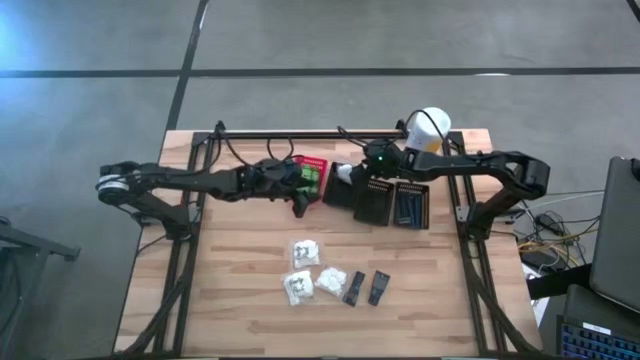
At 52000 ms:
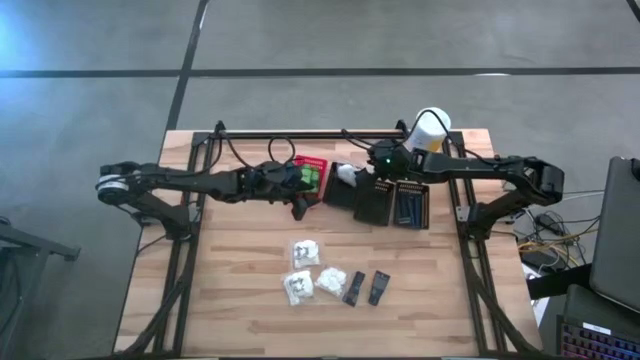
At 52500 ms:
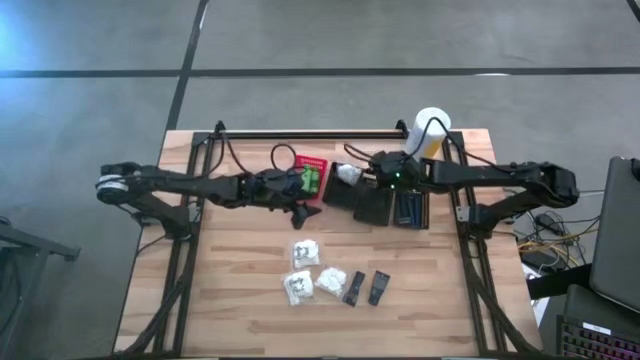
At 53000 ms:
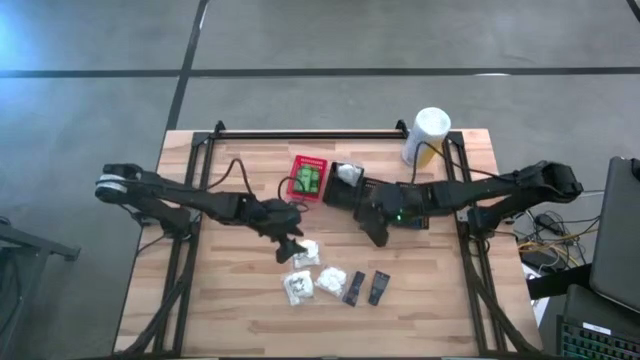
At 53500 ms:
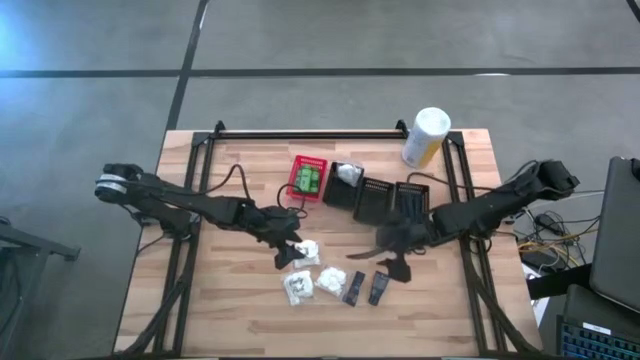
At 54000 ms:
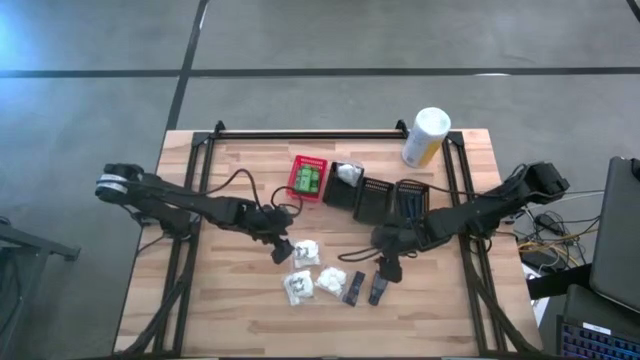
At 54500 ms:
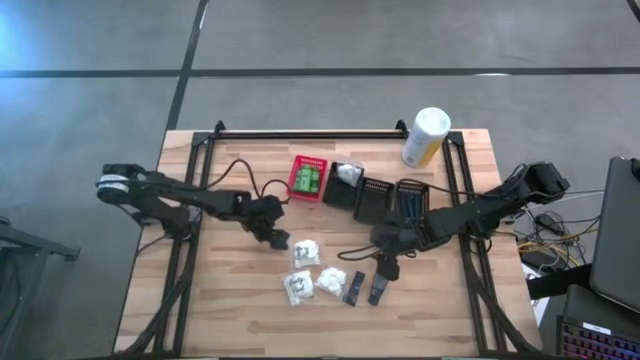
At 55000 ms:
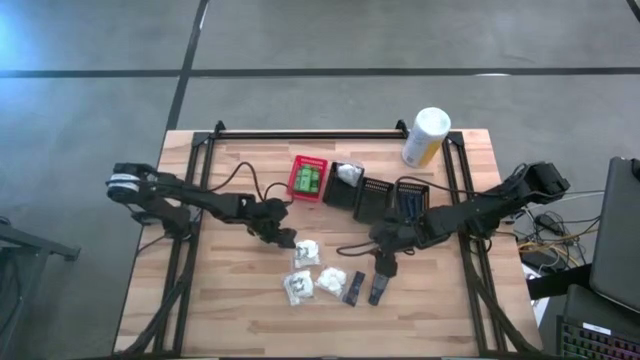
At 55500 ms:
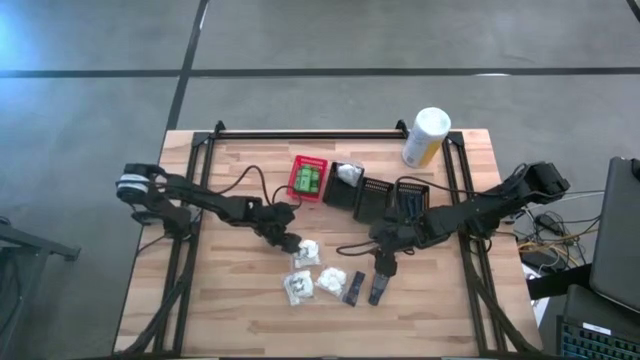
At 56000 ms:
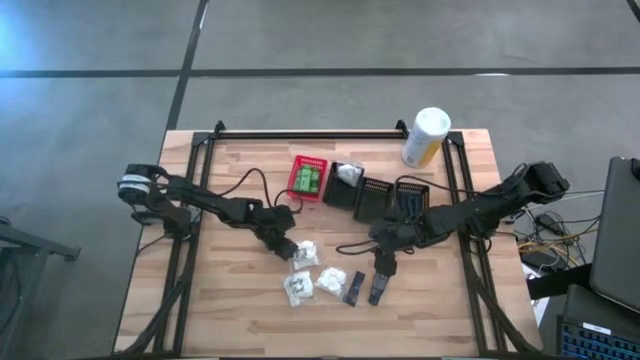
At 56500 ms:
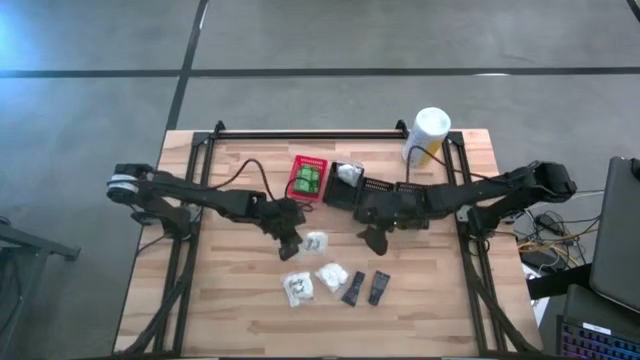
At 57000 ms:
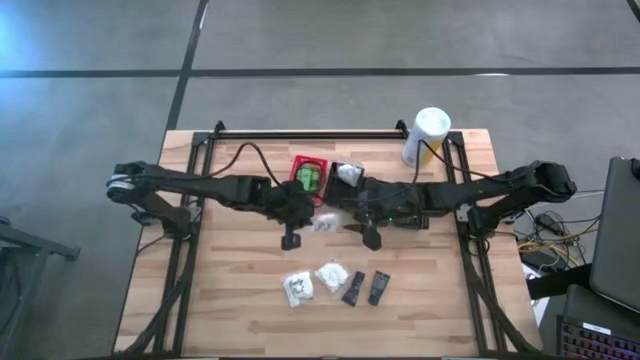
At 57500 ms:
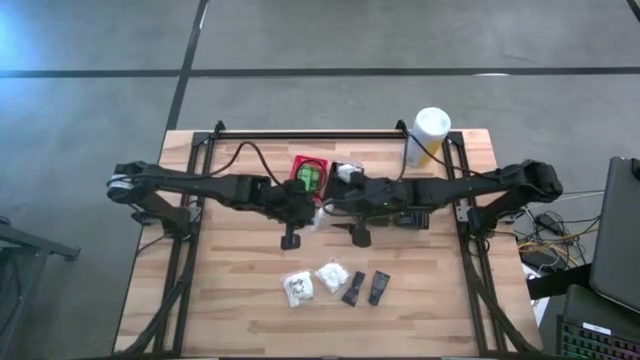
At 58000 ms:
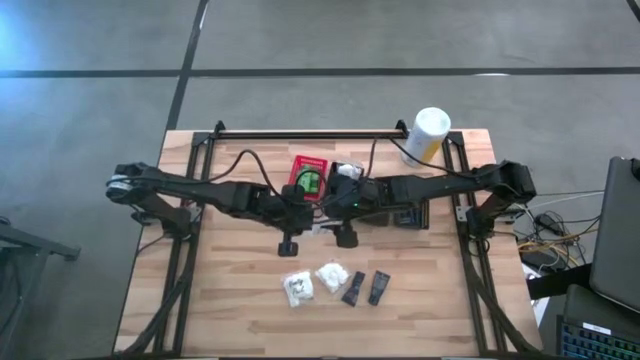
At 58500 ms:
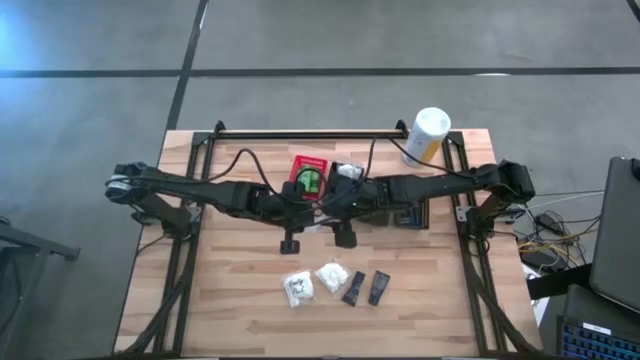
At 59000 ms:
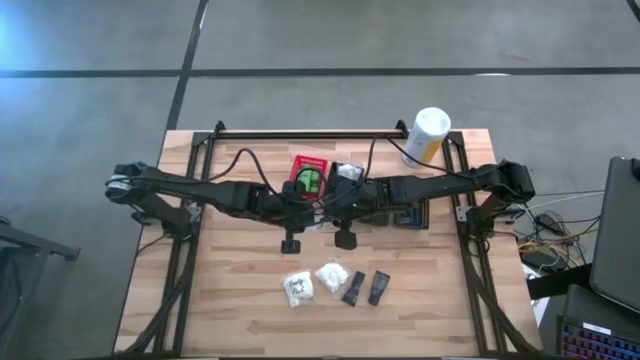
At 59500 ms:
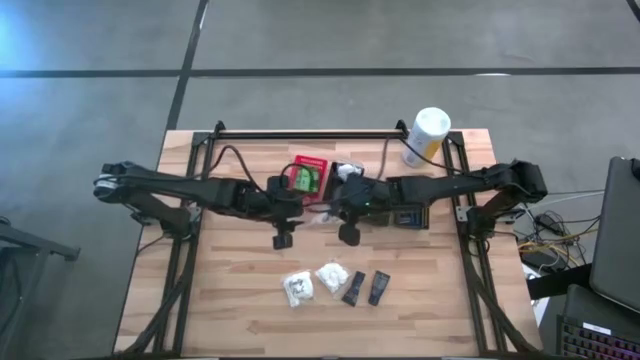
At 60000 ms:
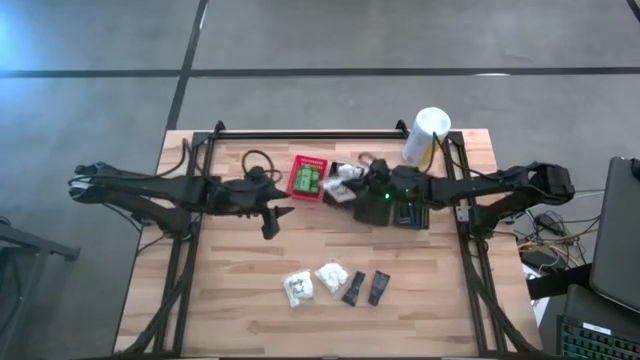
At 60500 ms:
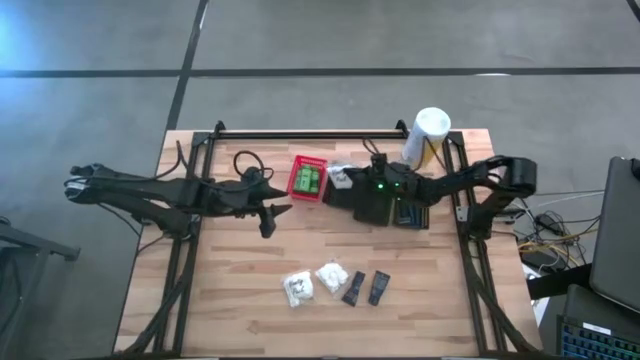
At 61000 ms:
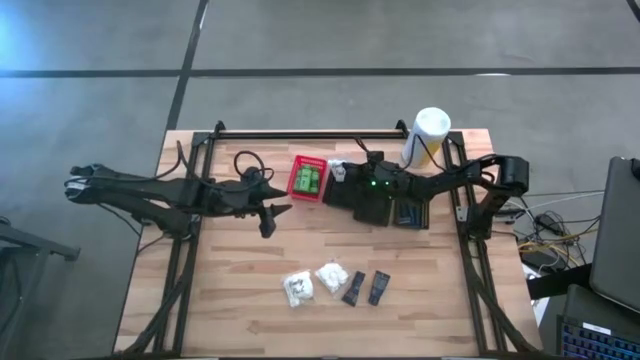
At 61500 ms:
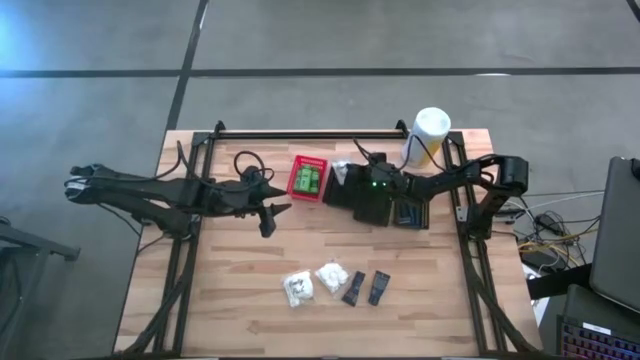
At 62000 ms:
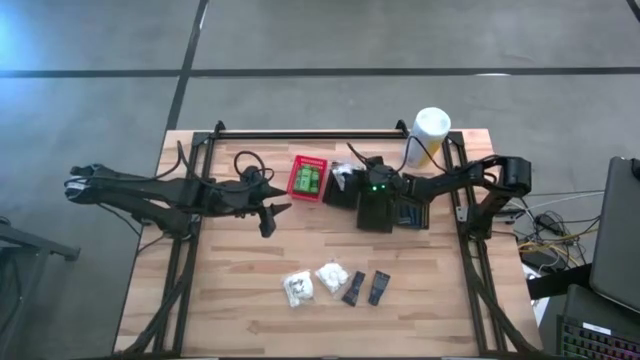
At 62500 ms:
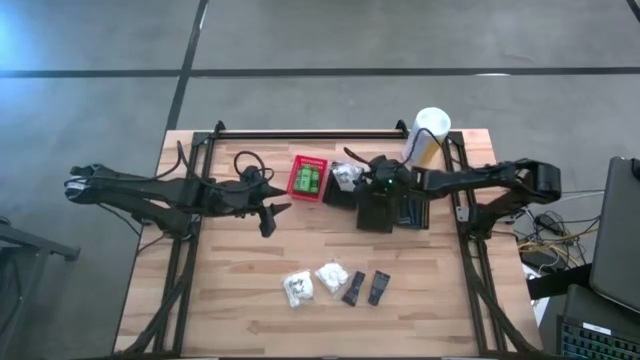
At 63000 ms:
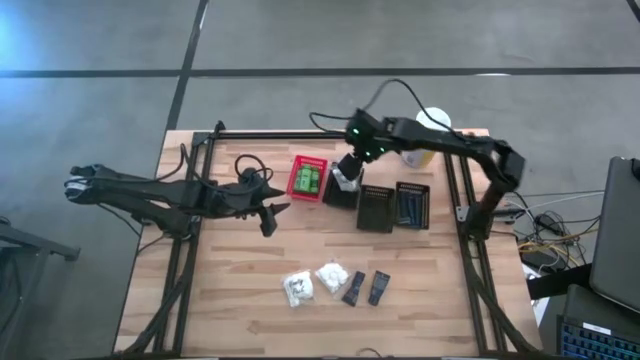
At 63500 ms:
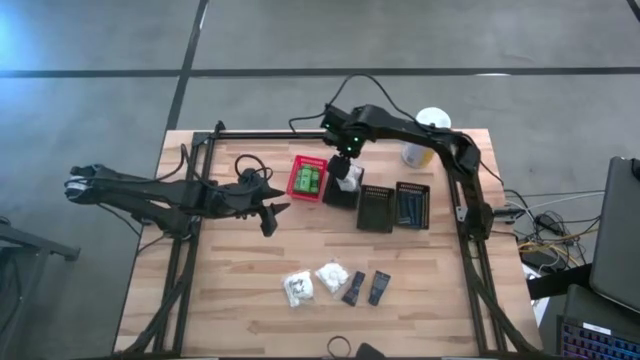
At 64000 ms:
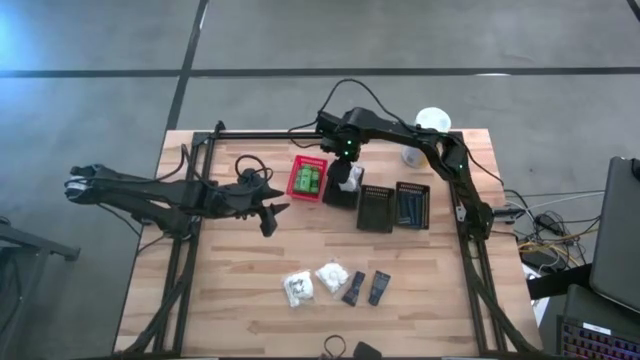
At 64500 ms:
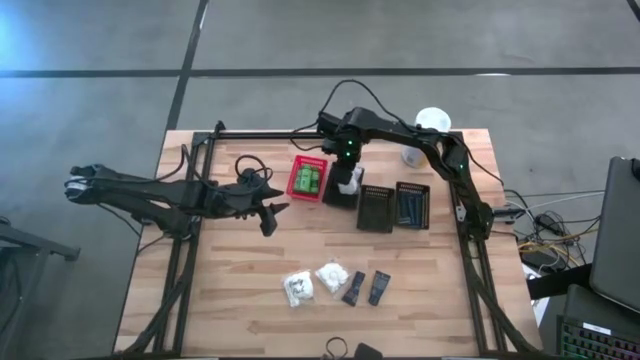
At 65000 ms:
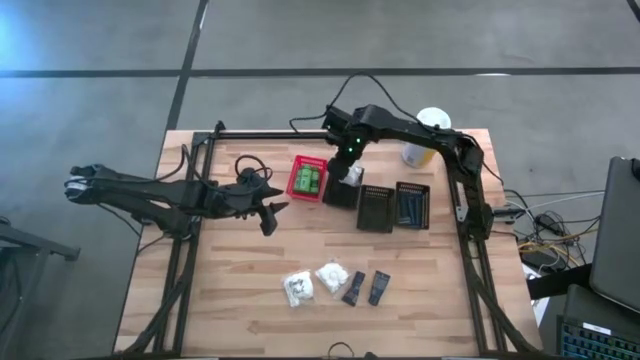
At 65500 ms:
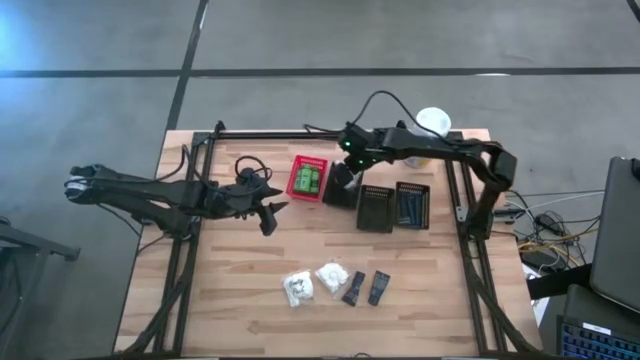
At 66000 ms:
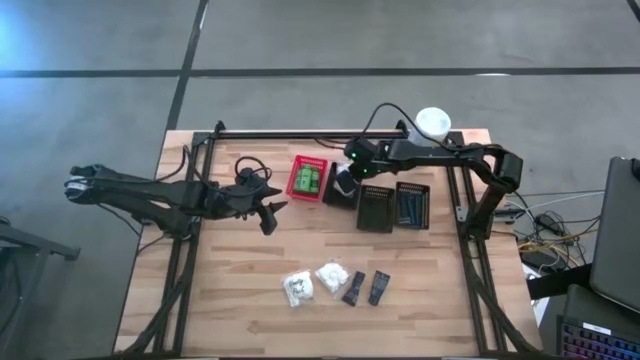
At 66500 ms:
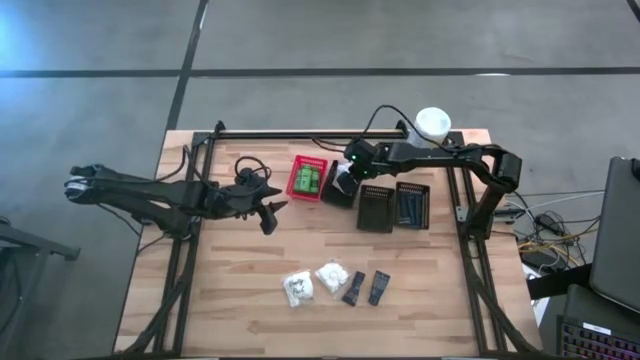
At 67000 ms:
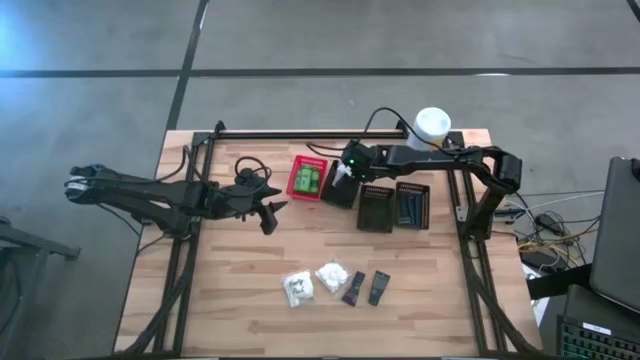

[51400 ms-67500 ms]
Task: Pick & Place Travel size toiletries
Put the cotton pack into the left black bin

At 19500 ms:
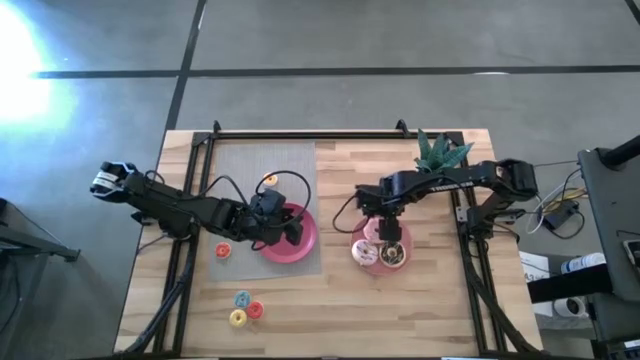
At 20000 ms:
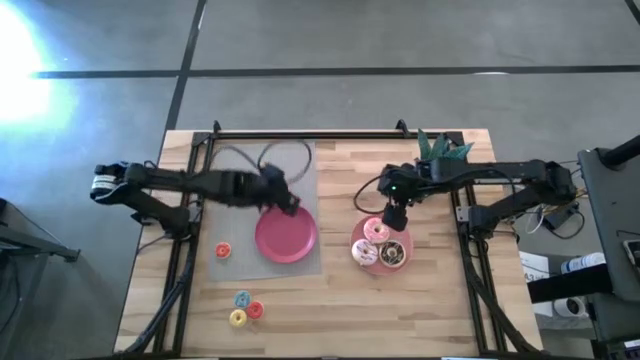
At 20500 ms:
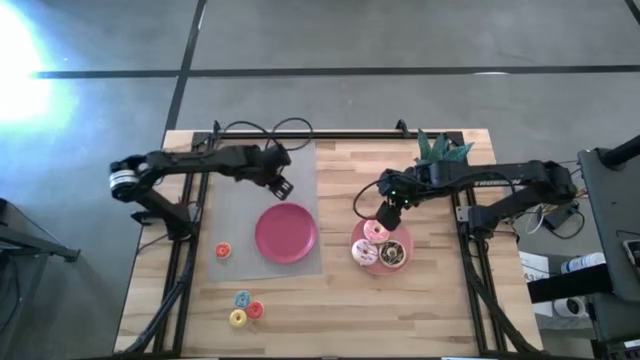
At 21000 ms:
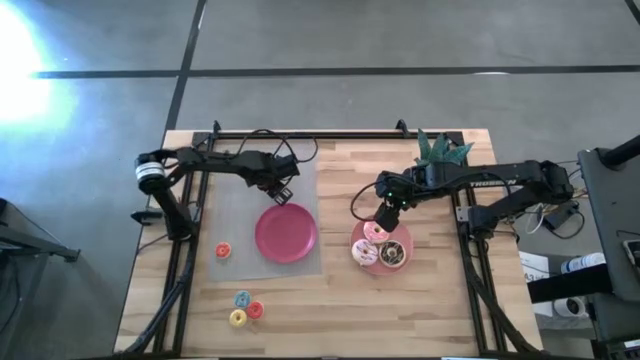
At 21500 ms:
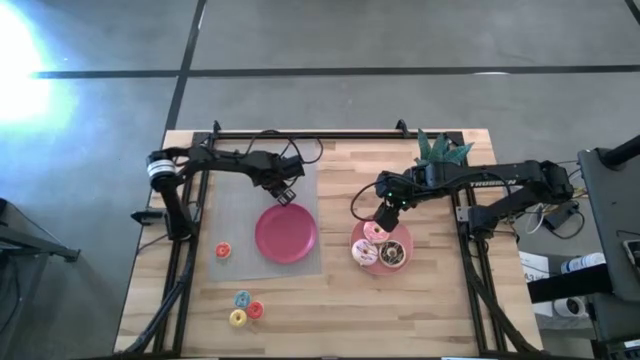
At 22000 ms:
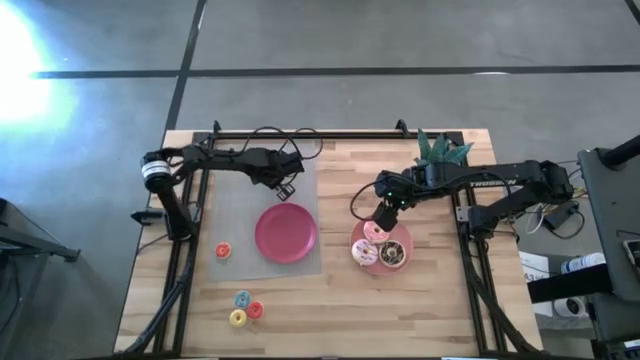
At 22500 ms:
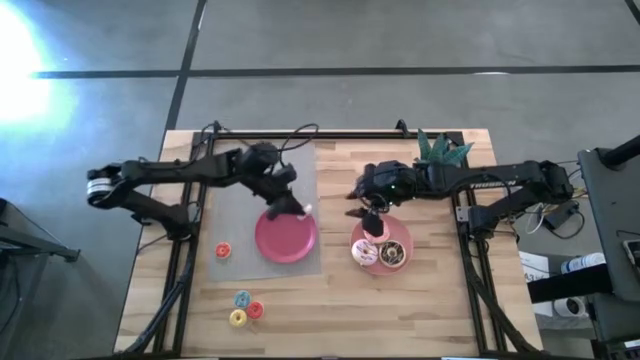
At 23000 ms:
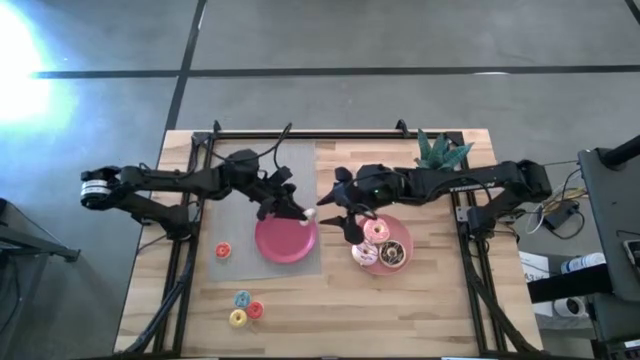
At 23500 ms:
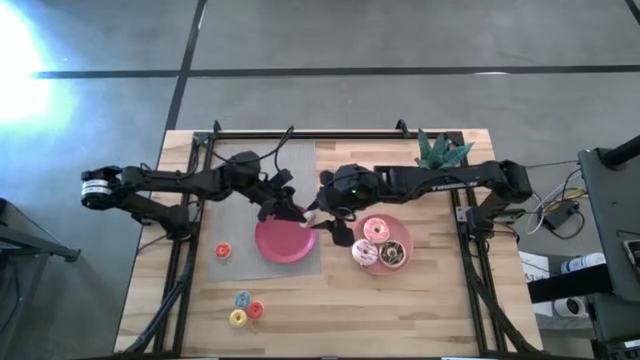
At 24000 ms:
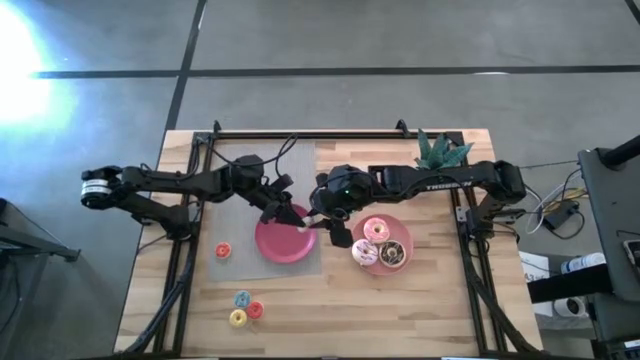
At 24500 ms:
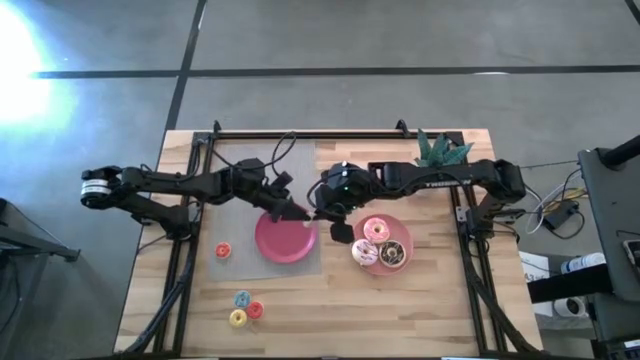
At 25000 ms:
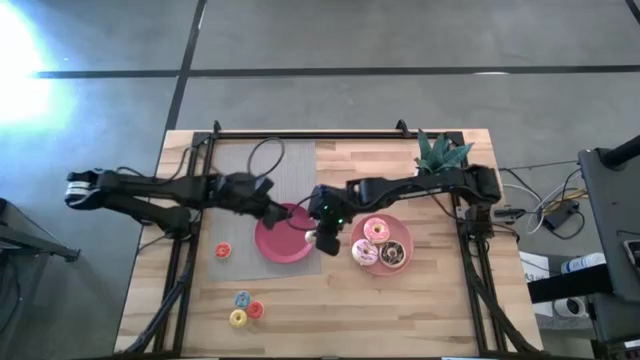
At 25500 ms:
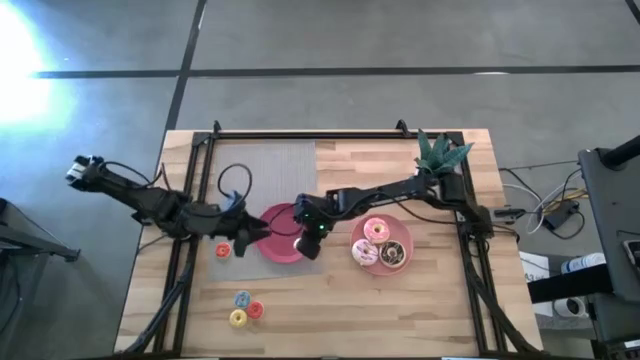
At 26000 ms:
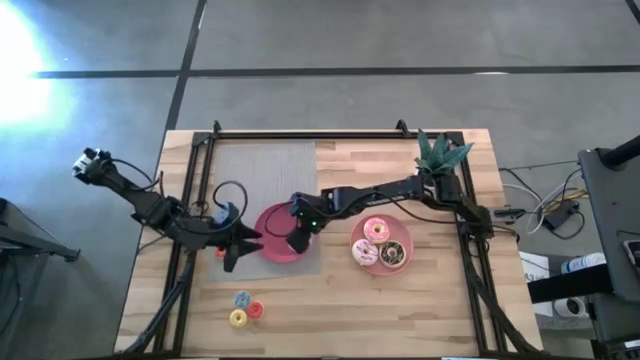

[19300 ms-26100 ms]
Task: Pick & Place donuts
Put the small white donut on the dark pink plate
